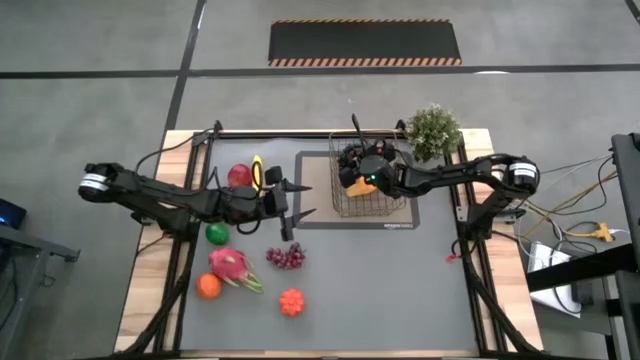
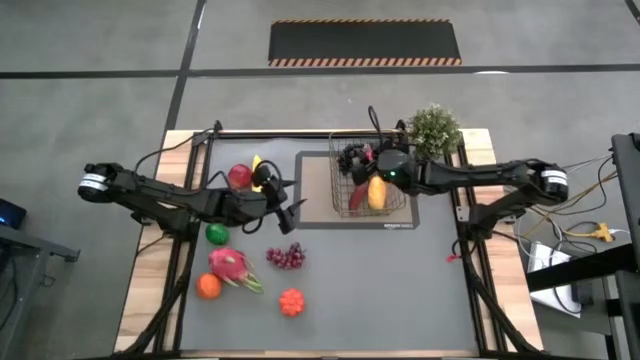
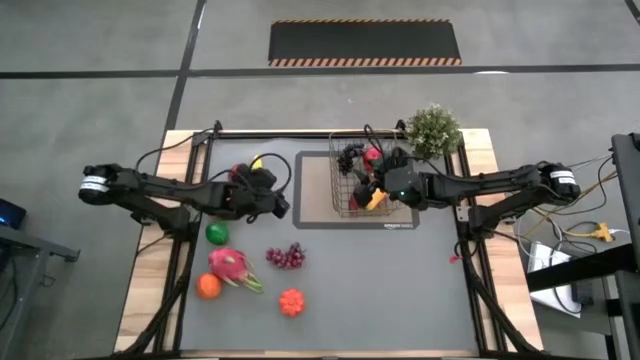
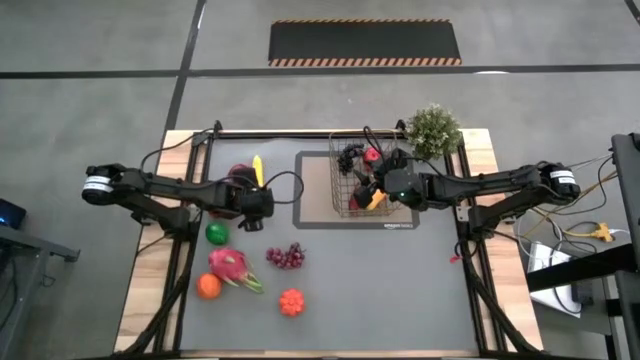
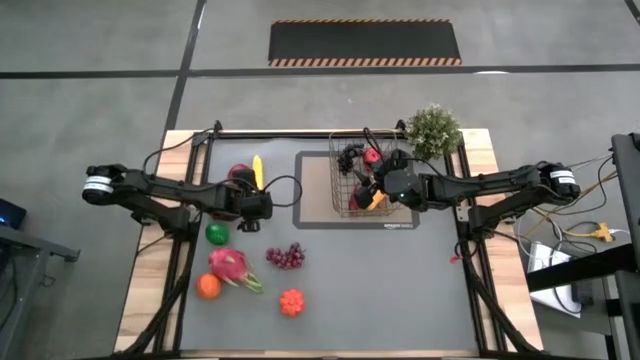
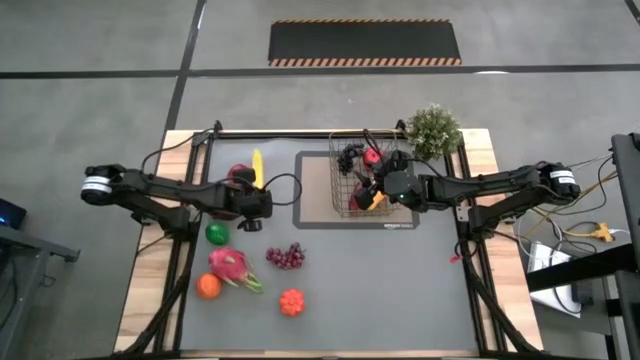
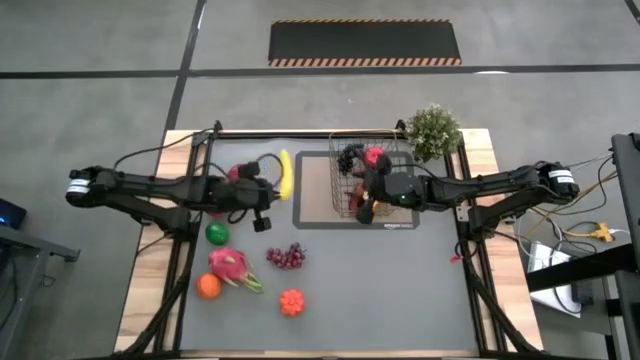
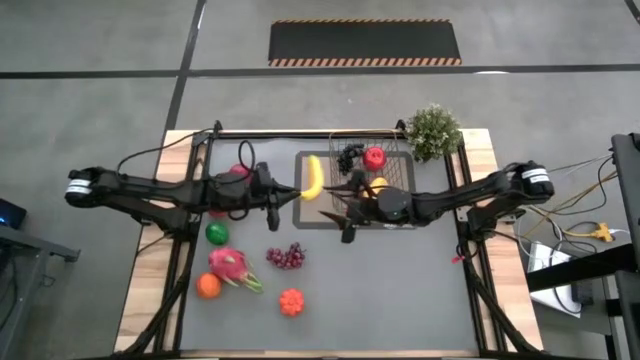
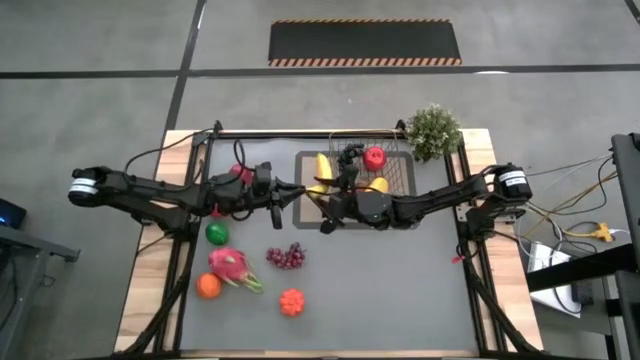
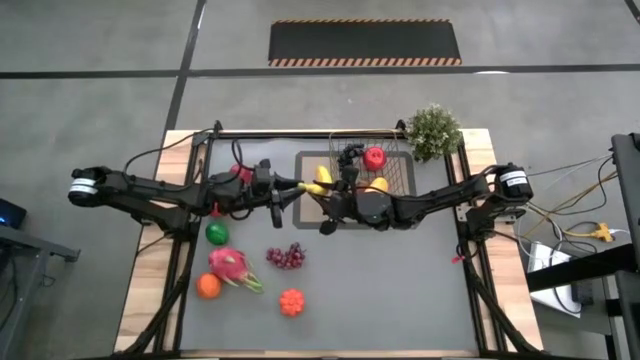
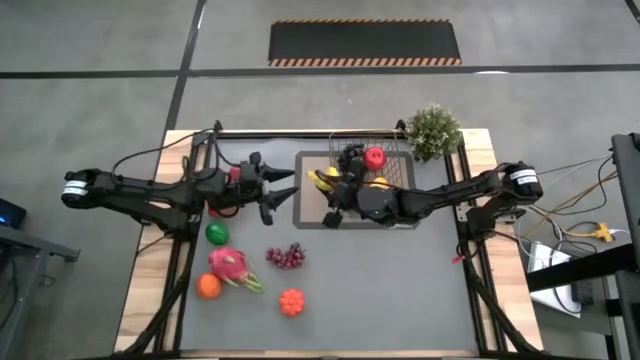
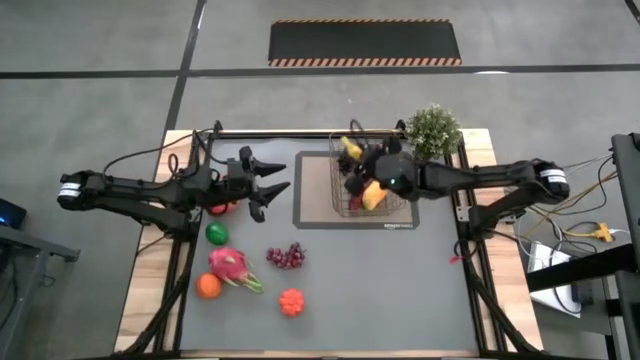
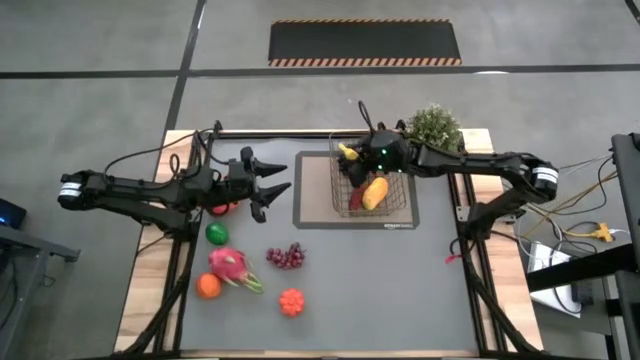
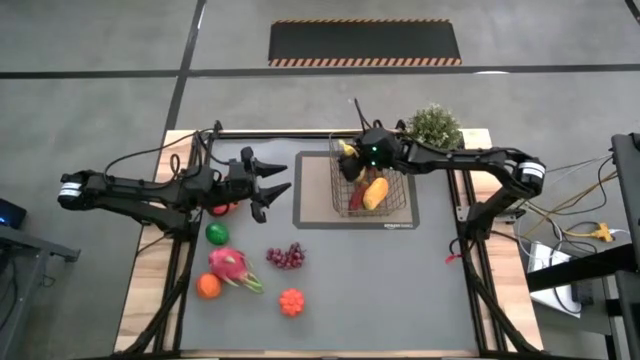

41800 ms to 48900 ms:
Task: Build produce basket
Put the banana into the wire basket

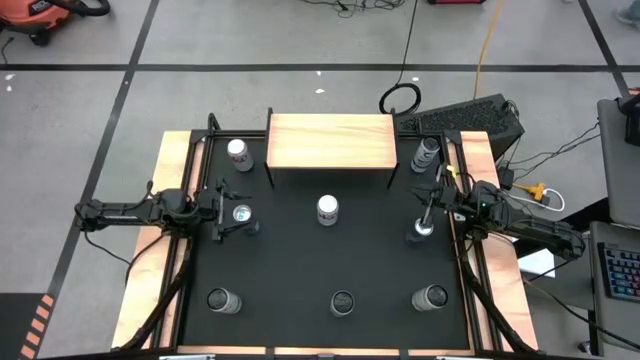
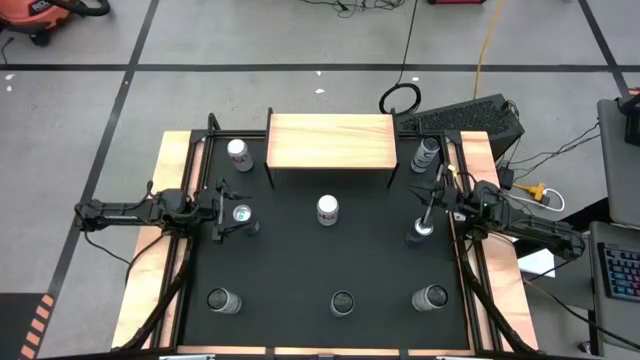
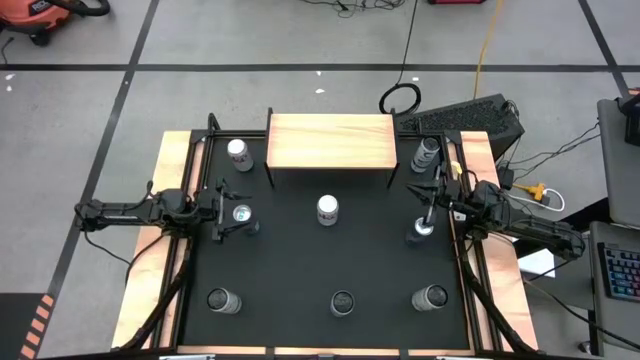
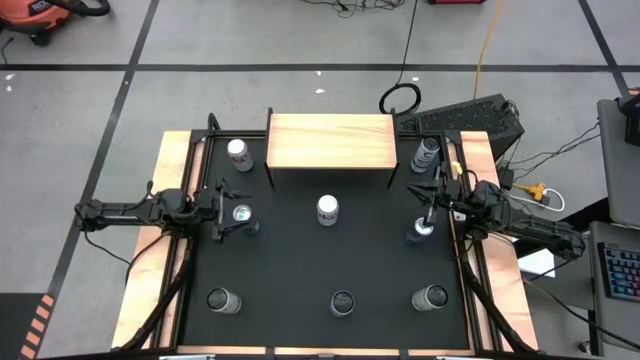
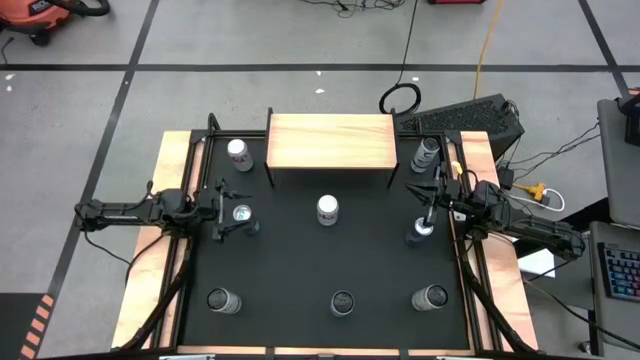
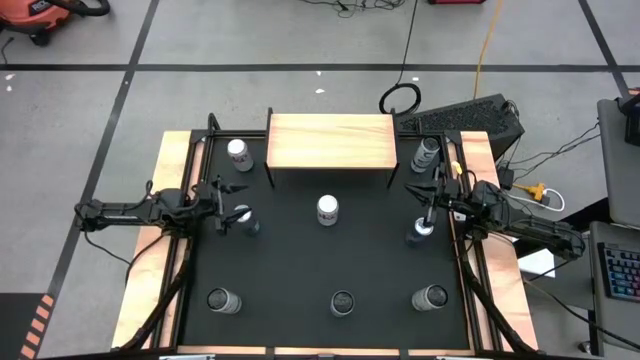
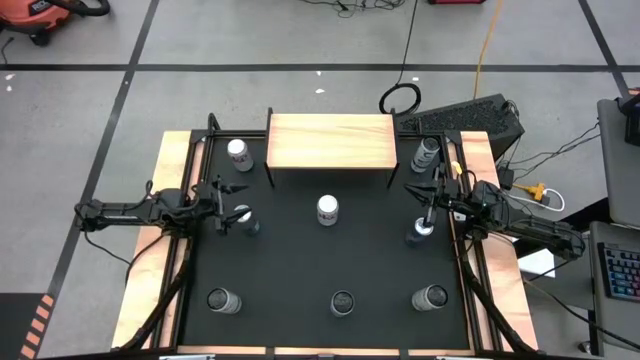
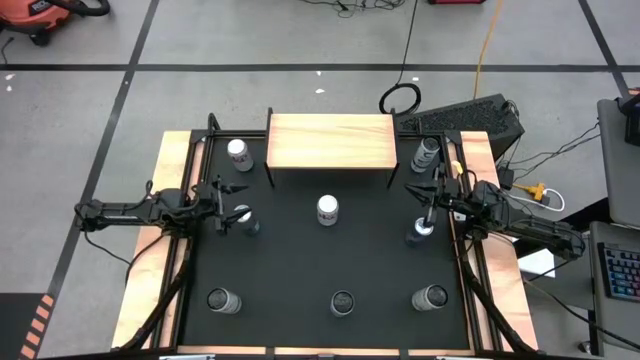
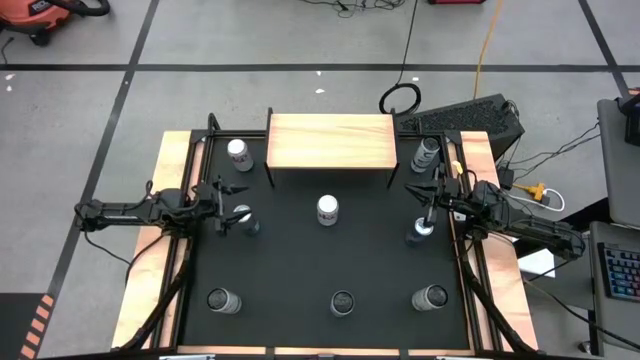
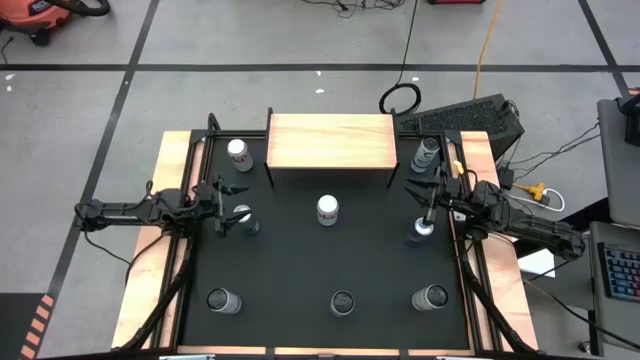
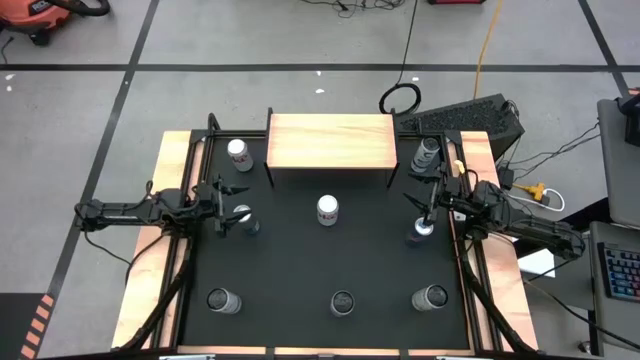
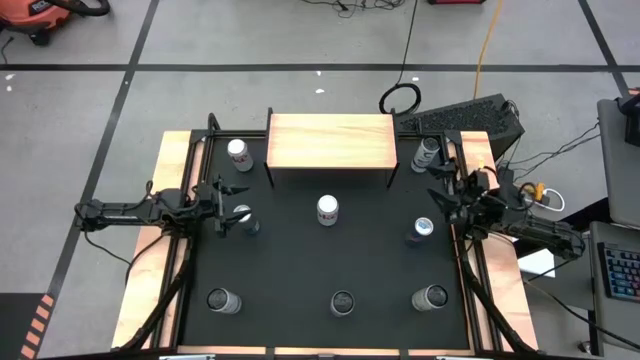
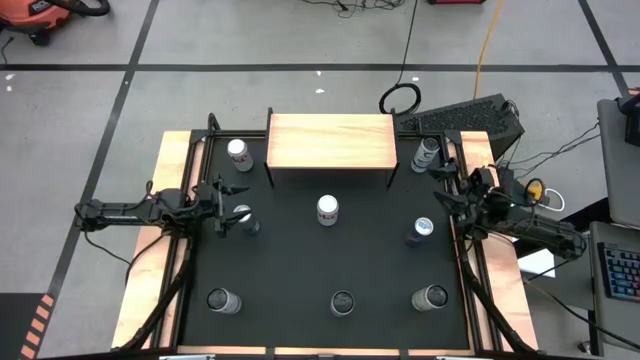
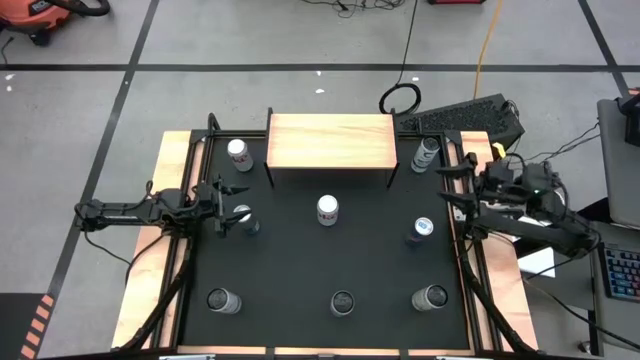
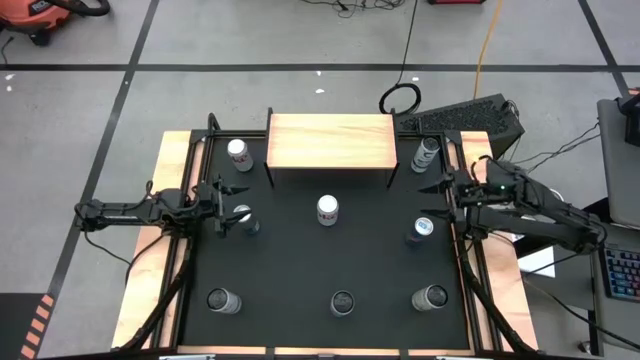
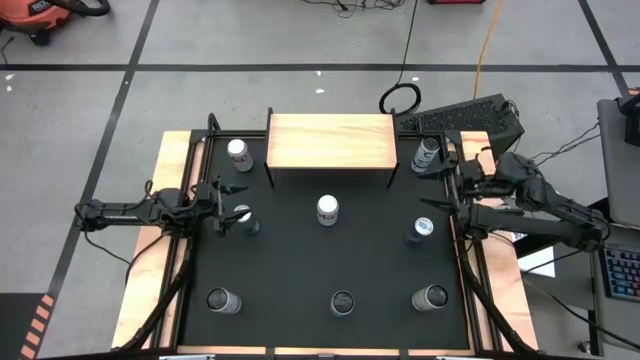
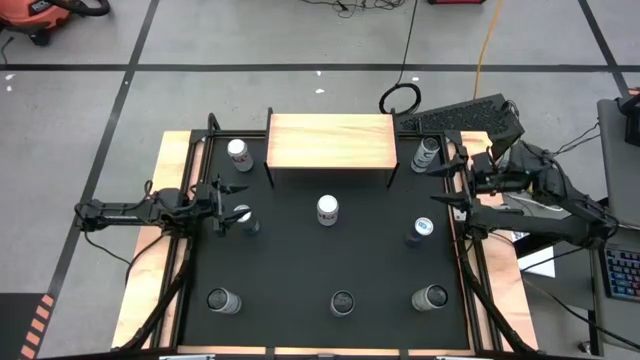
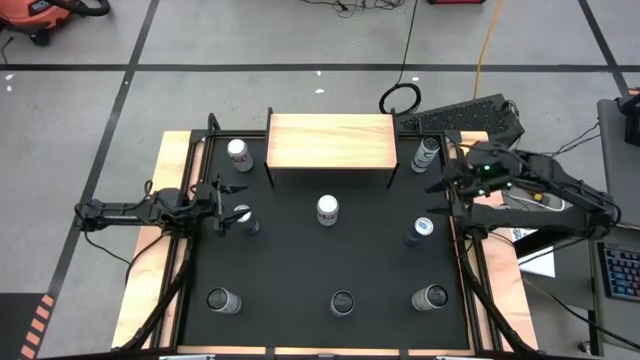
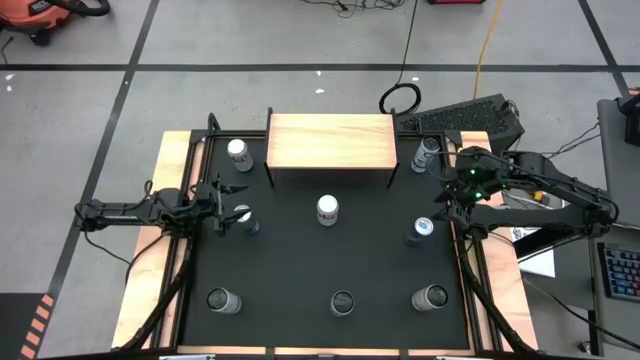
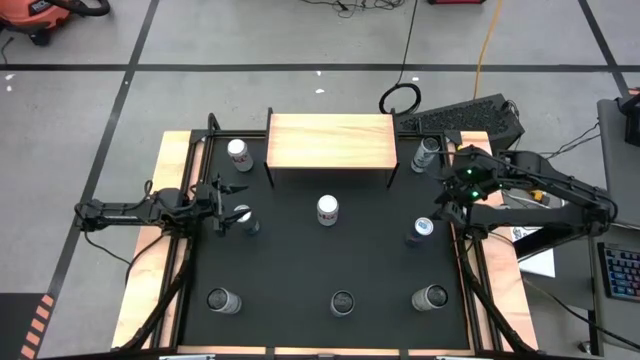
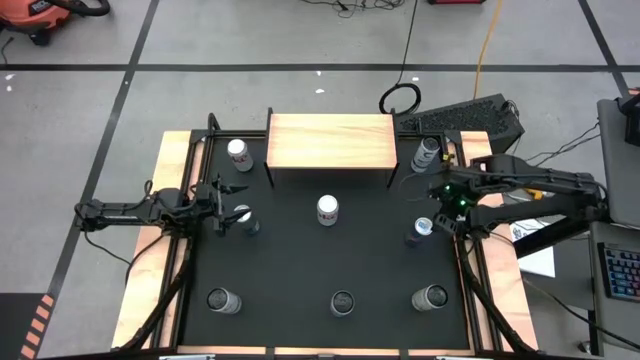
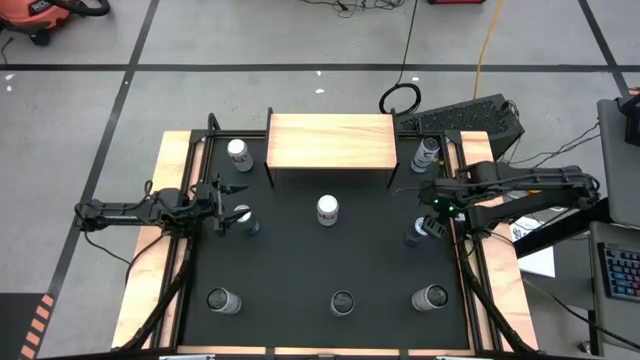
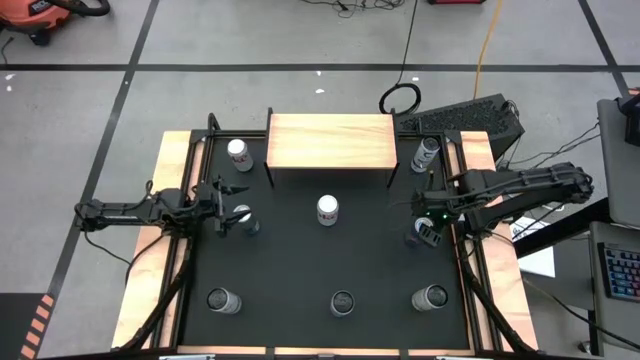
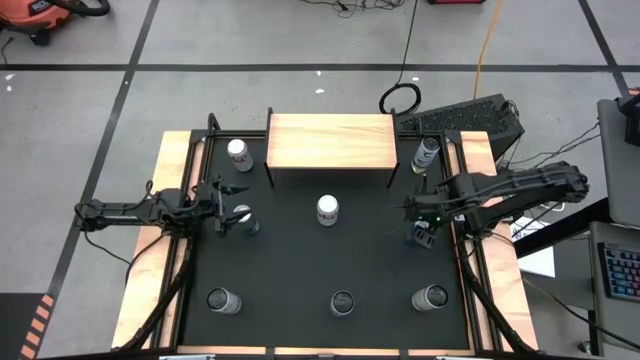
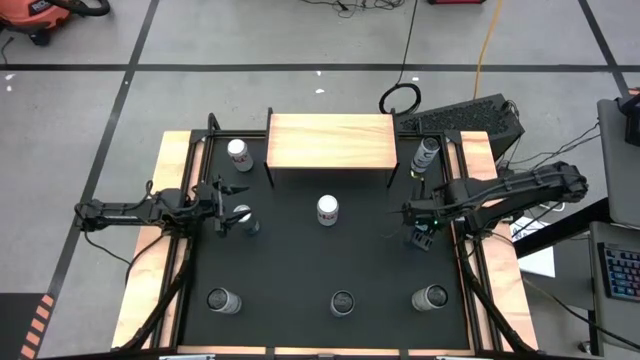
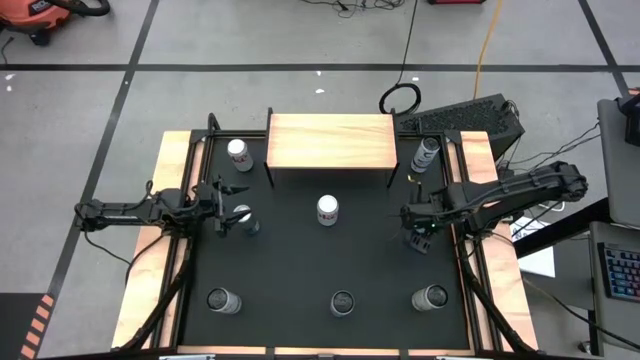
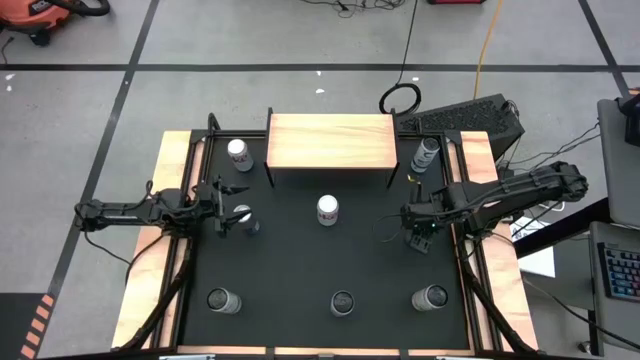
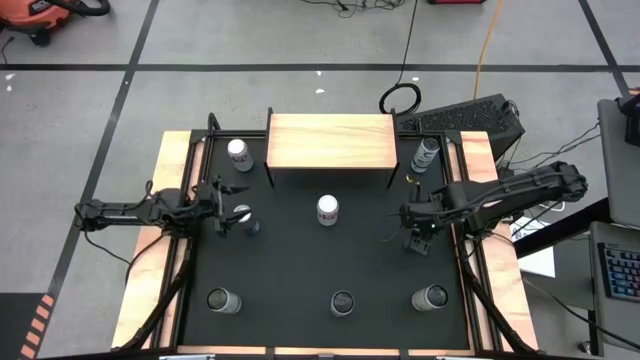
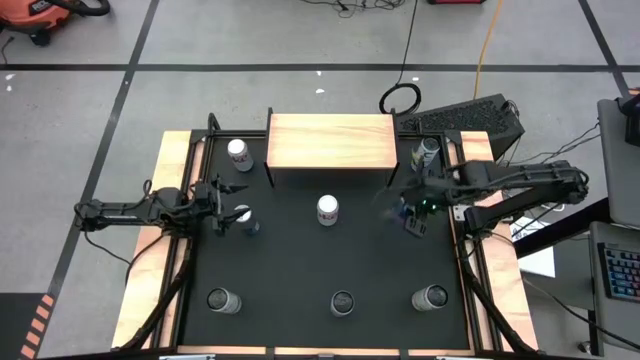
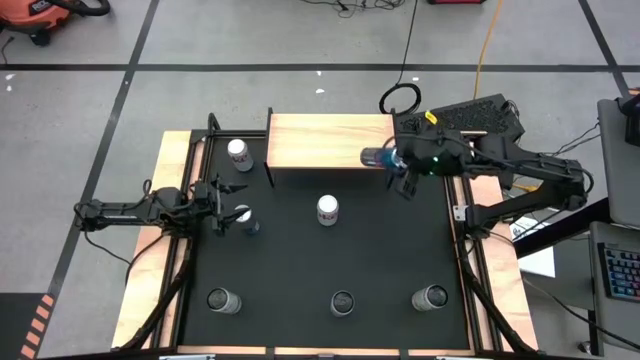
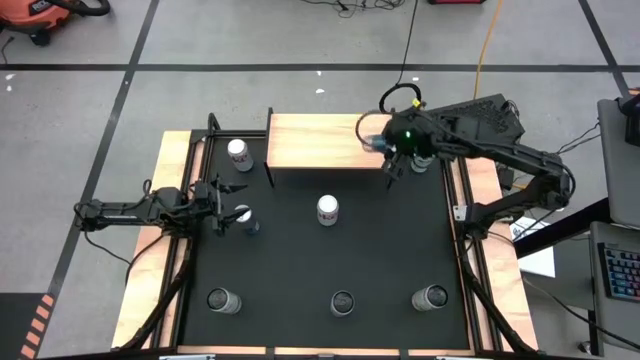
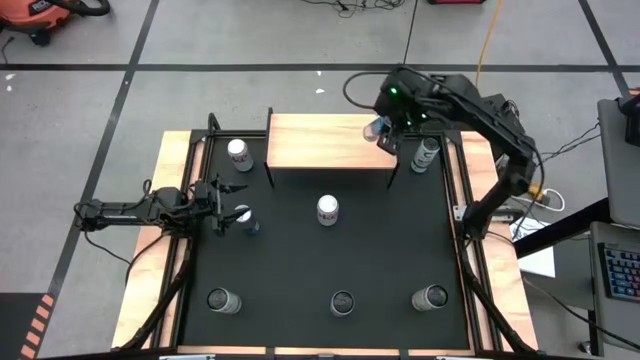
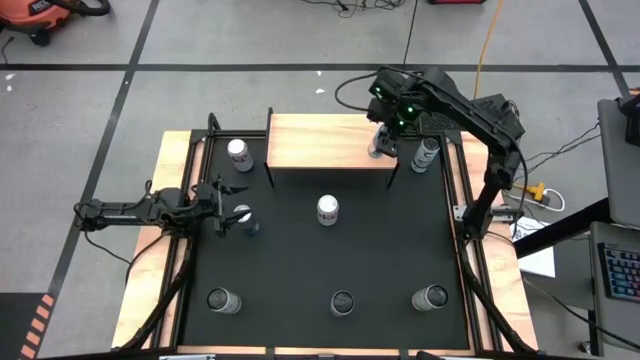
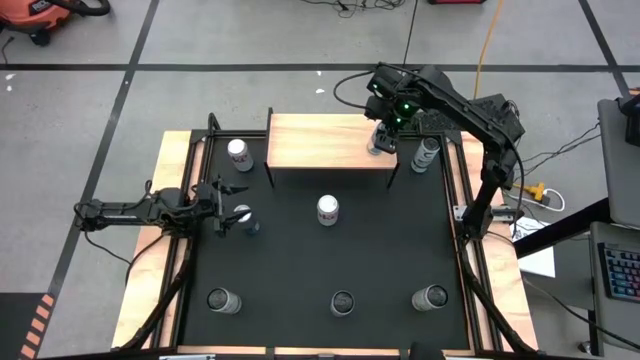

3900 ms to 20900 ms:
Task: Place canned beverage on shelf
Put the right blue soda can on the shelf
